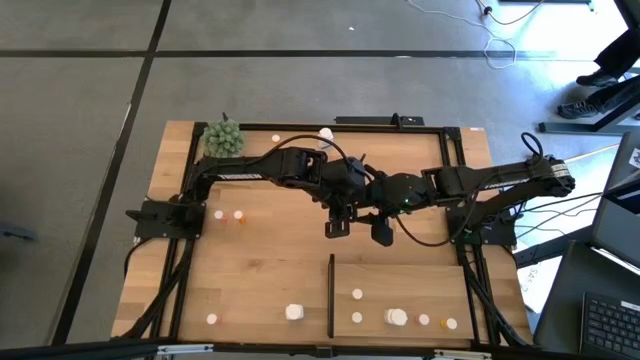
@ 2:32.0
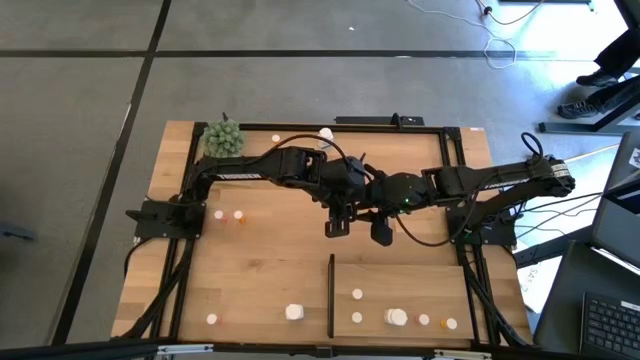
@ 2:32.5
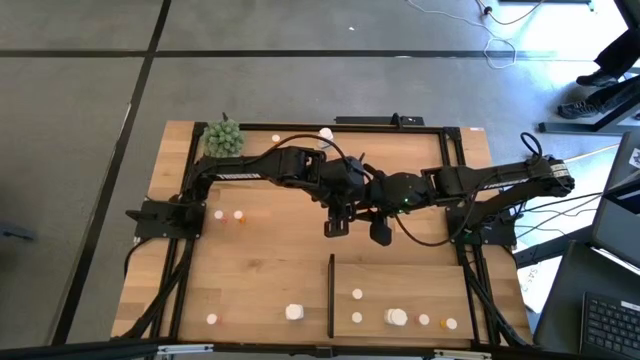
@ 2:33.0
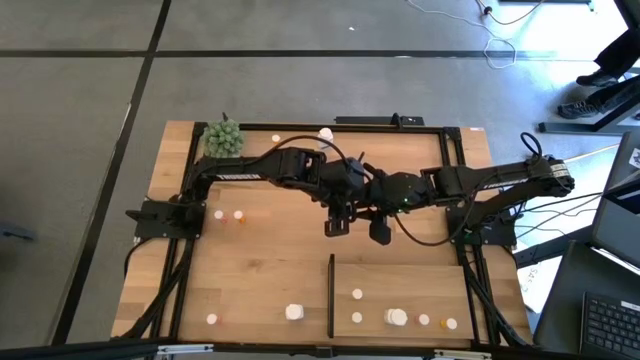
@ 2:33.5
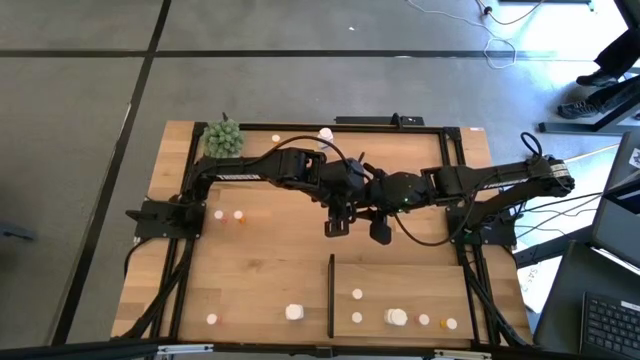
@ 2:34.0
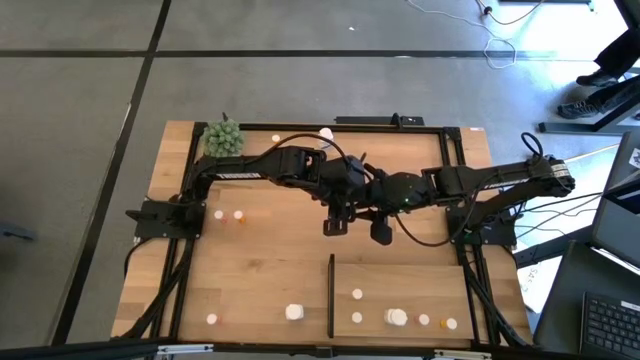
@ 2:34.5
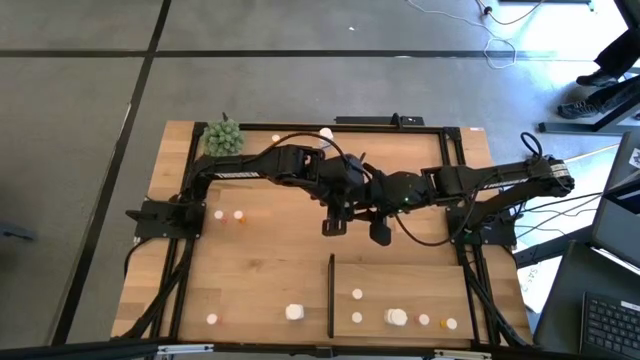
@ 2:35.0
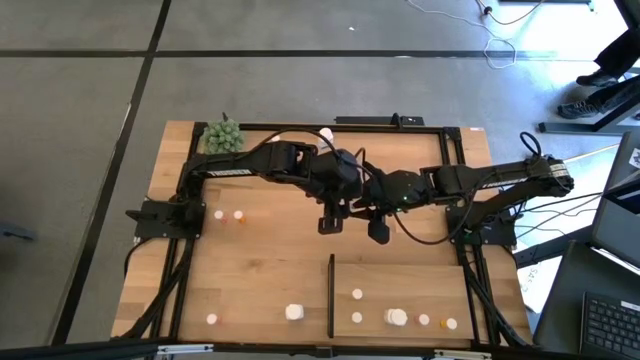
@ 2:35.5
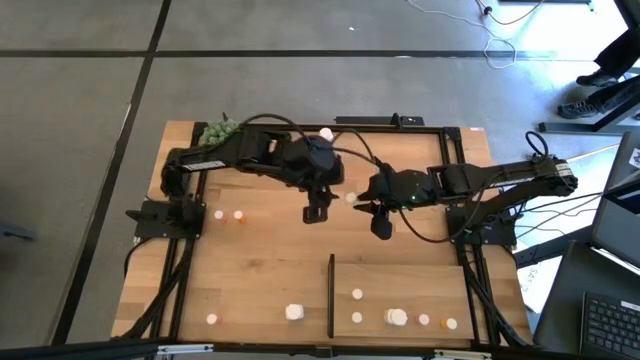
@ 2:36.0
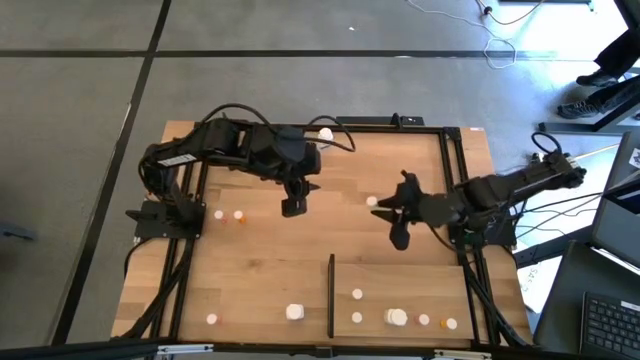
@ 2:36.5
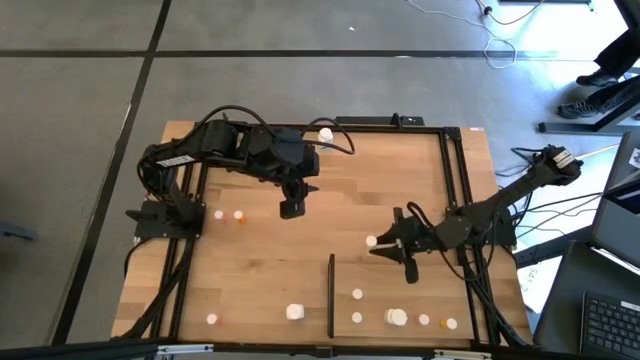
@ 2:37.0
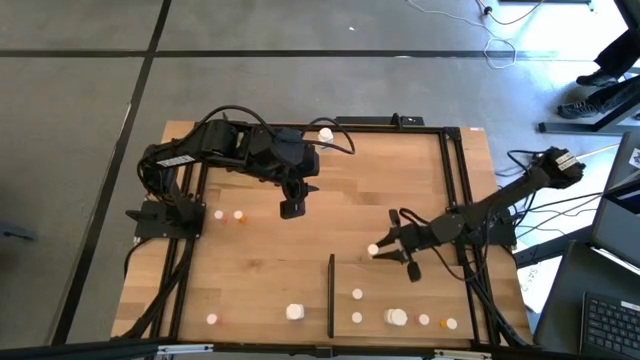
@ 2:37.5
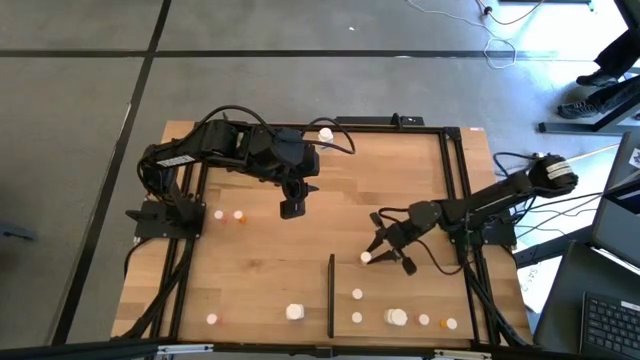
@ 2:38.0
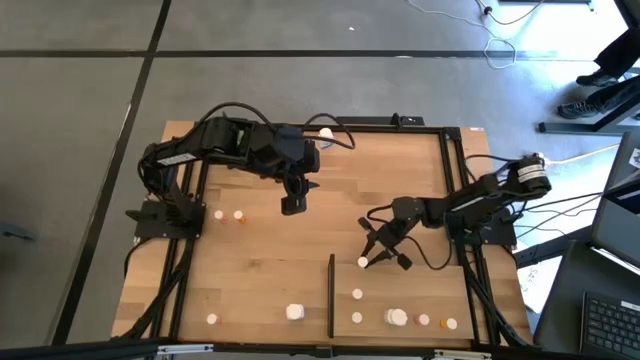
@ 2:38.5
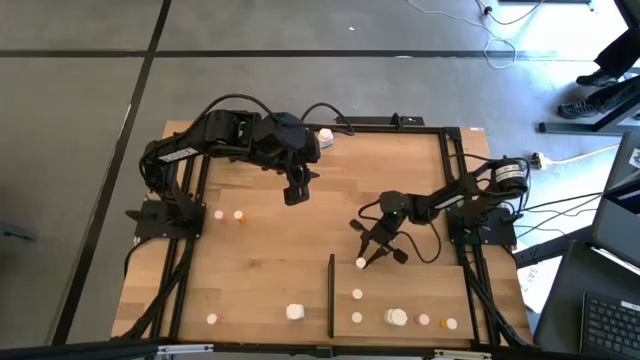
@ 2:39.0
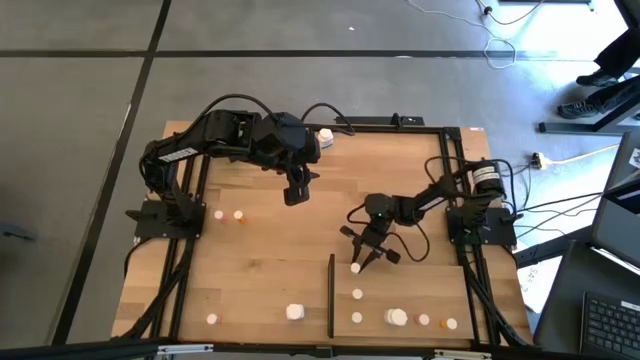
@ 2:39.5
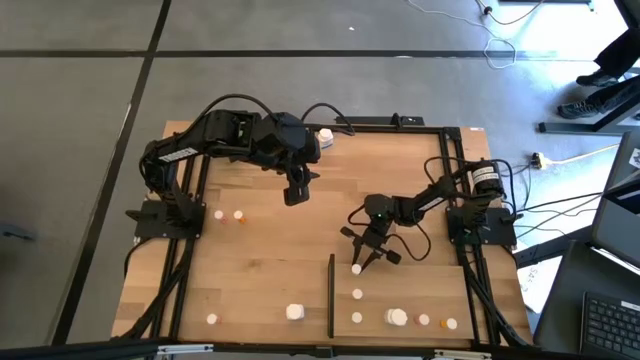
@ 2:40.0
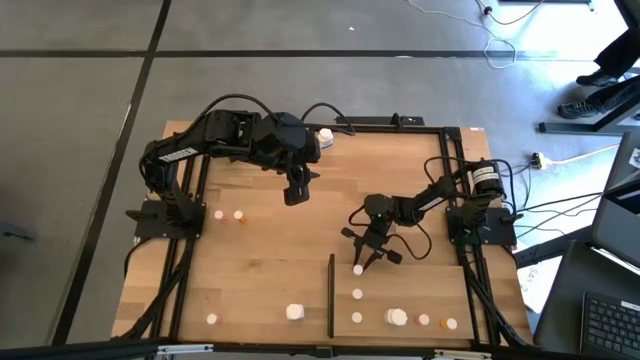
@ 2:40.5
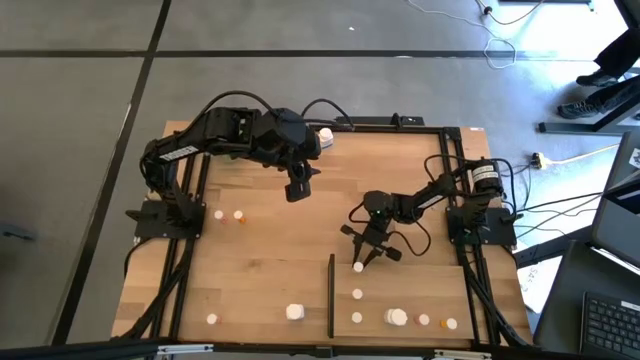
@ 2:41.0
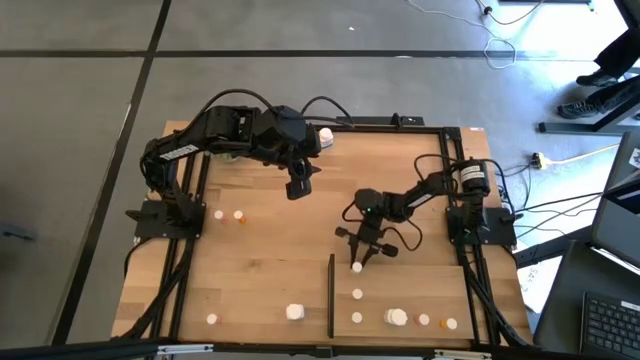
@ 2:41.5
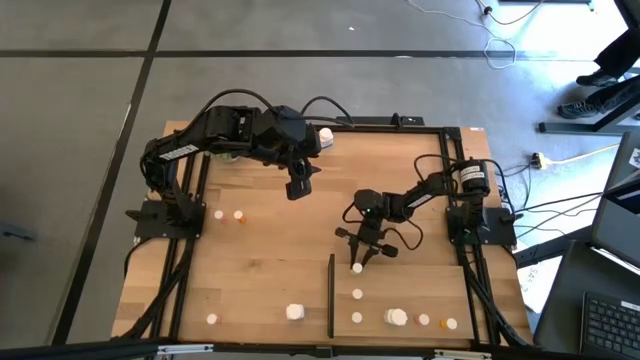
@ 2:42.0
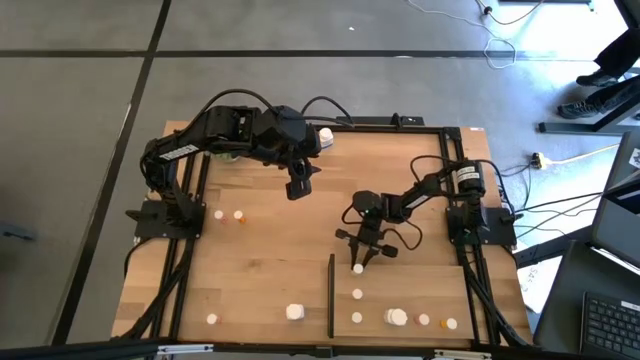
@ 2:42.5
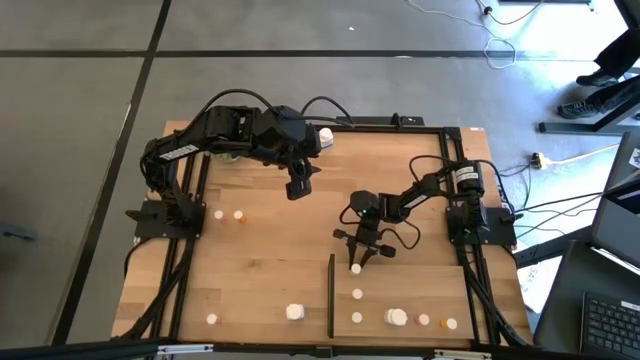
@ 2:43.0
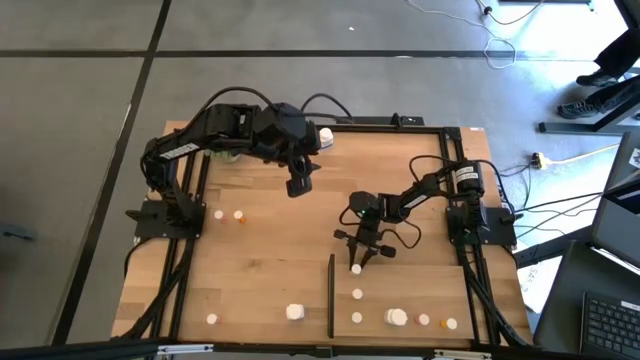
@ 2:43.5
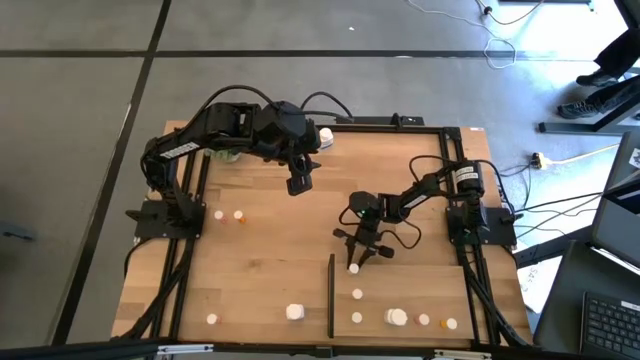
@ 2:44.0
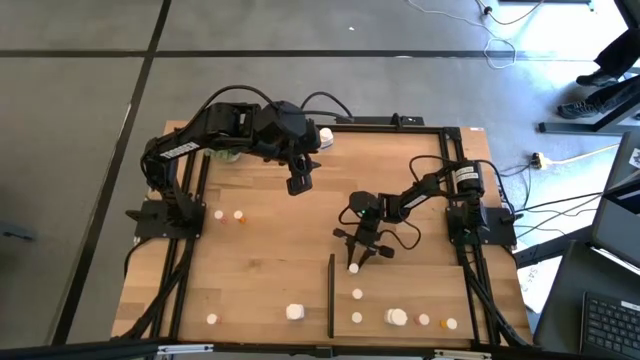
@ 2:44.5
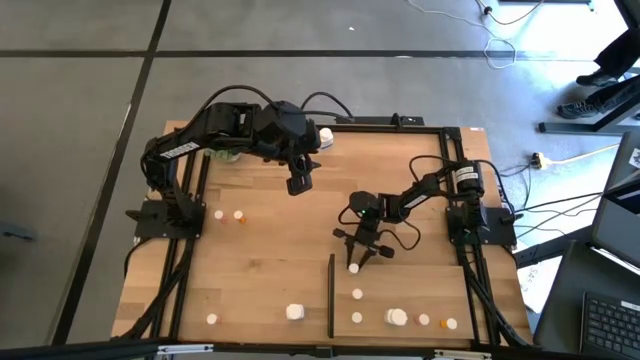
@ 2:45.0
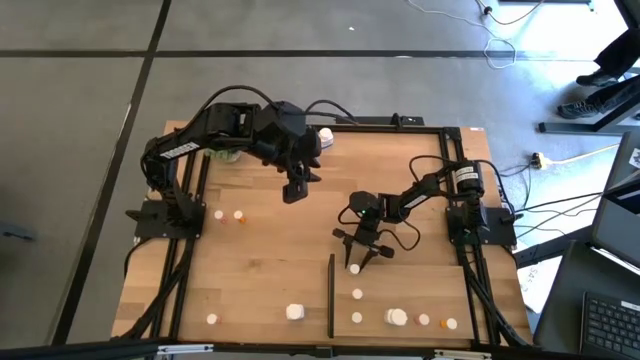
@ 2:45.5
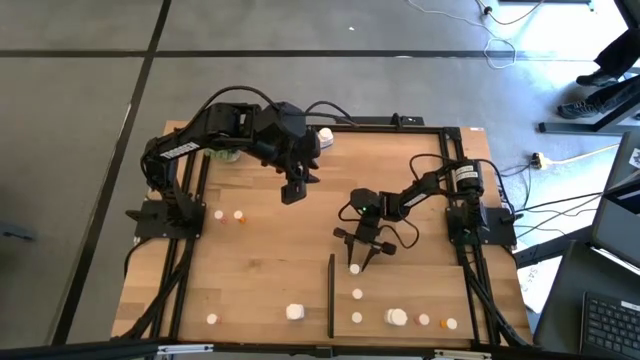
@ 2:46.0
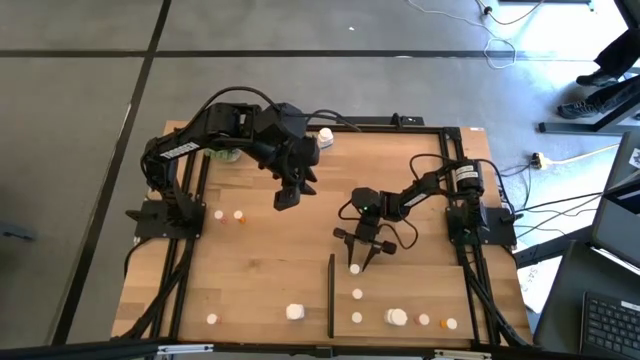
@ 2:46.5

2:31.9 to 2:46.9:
Task: Pick and place medicine bottles onto shelf by color
Put the yellow pill bottle on the shelf aligned with the other yellow pill bottles

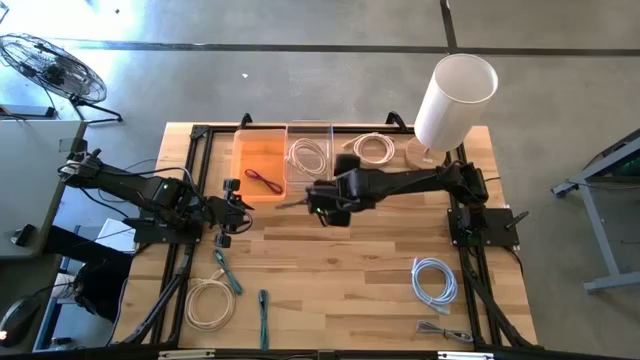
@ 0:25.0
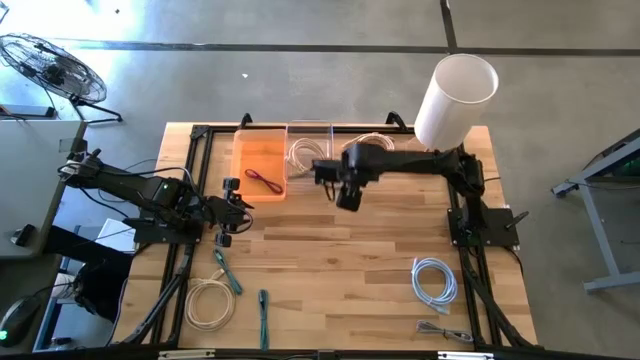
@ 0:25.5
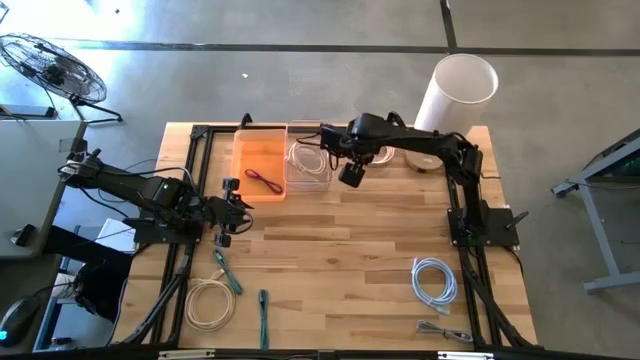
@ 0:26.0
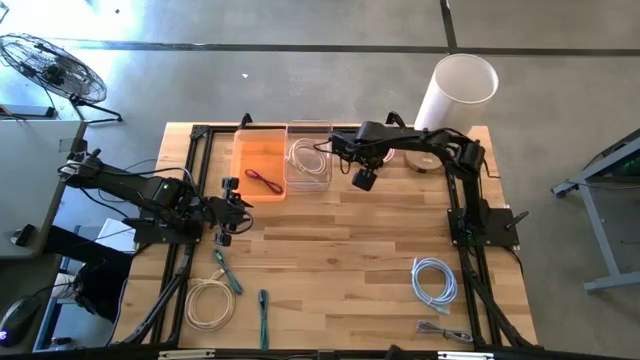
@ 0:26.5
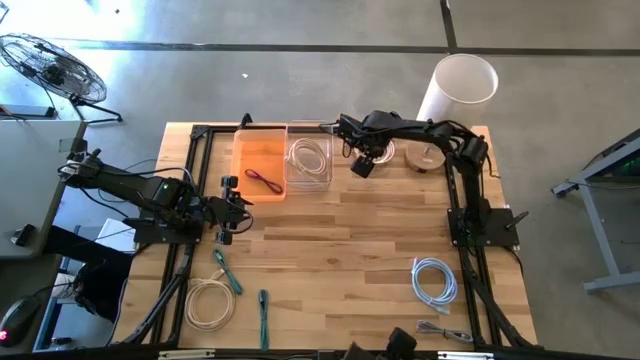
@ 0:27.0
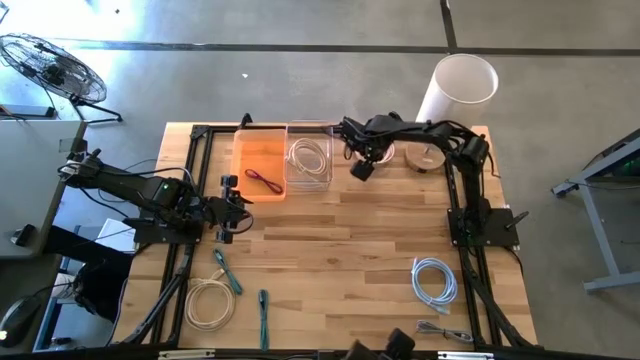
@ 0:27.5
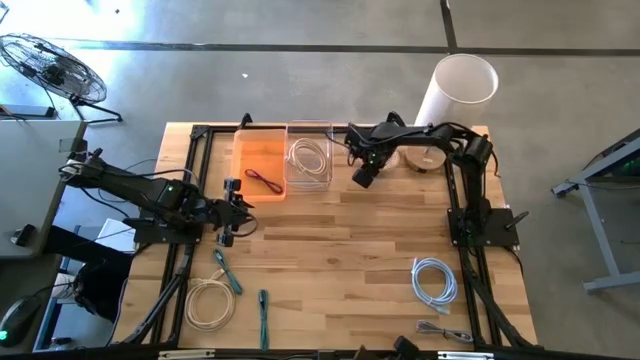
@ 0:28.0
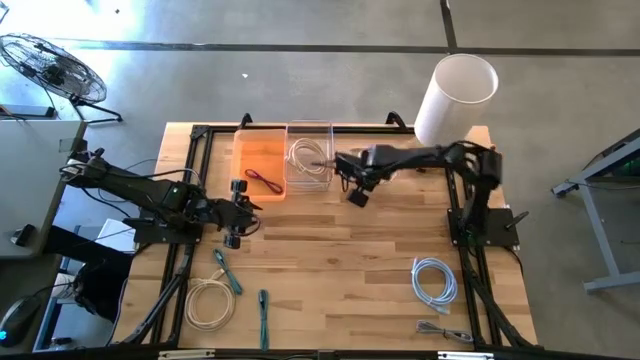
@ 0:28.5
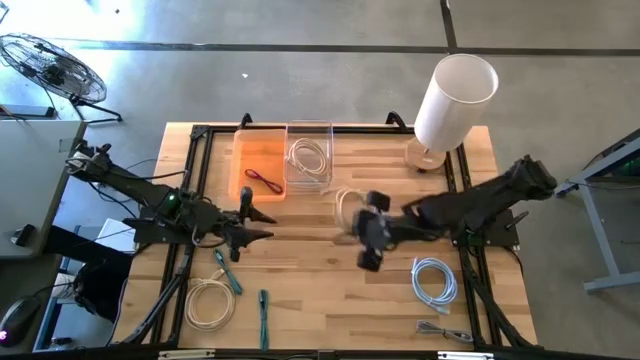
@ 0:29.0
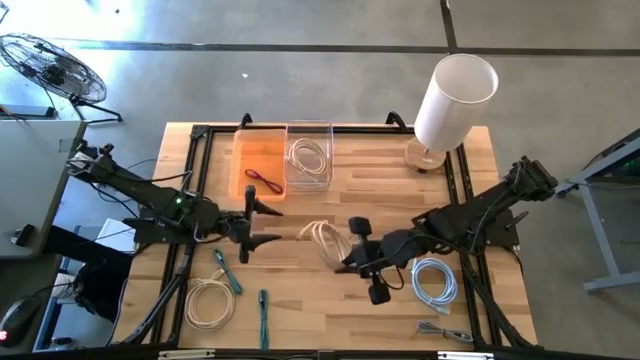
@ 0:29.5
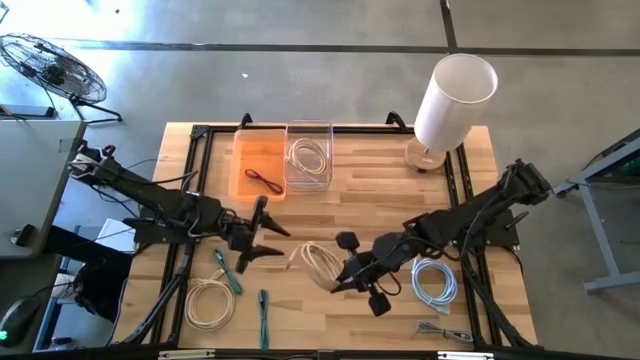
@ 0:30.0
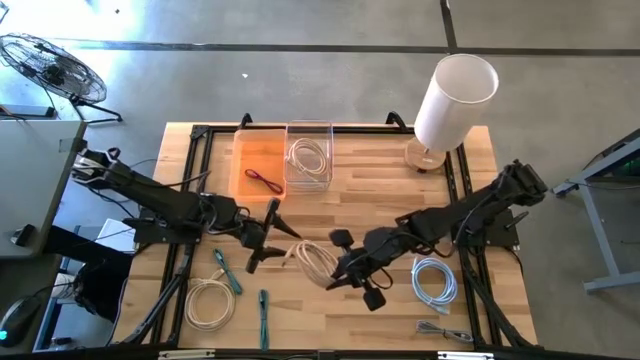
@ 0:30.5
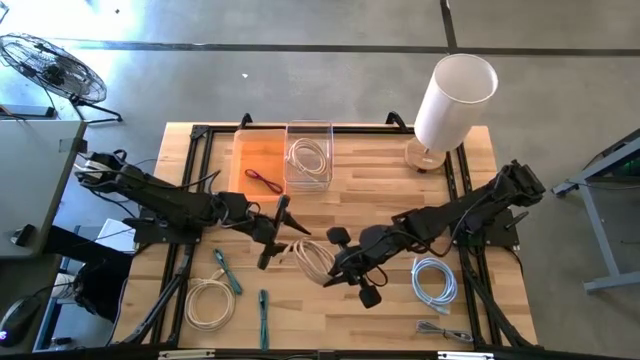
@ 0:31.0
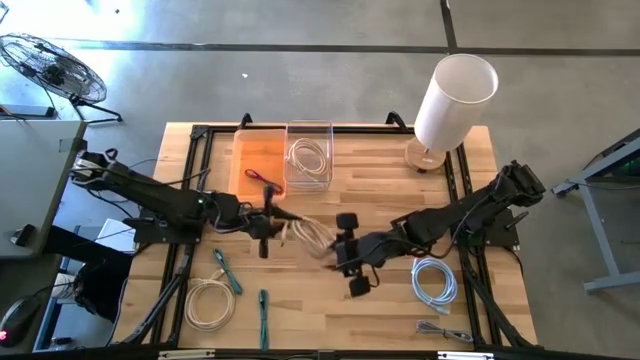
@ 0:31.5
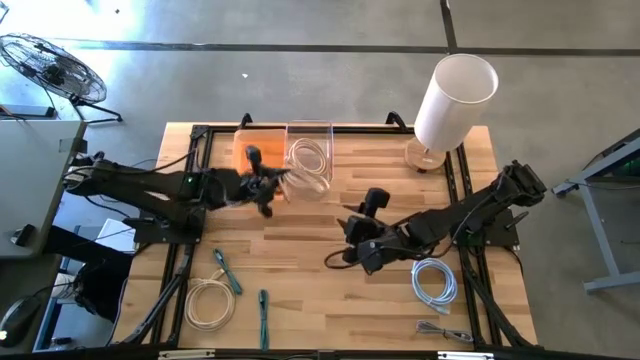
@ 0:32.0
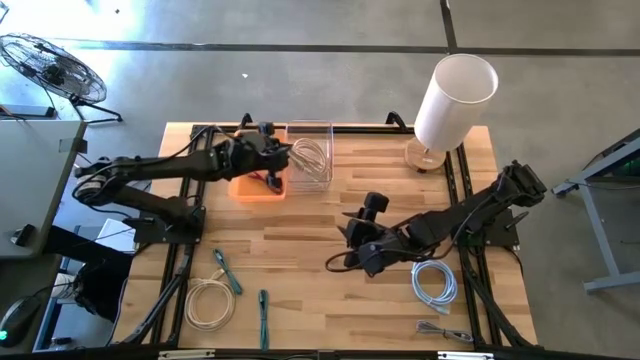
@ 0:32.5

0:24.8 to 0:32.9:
Task: Pick & Place USB Port
Put the top brown HDMI cable into the transparent bin
